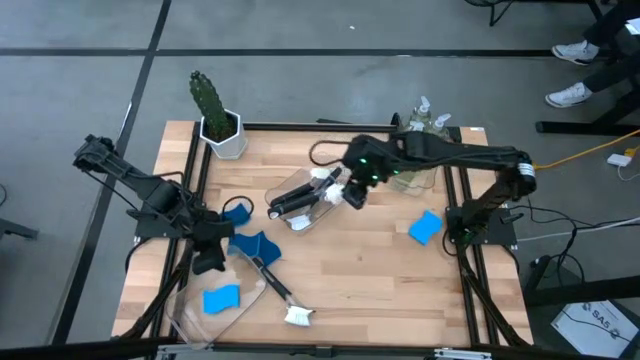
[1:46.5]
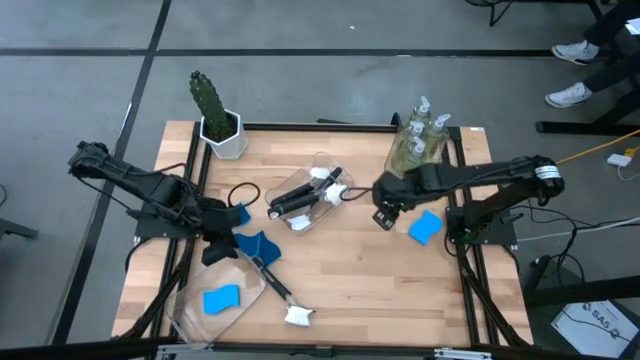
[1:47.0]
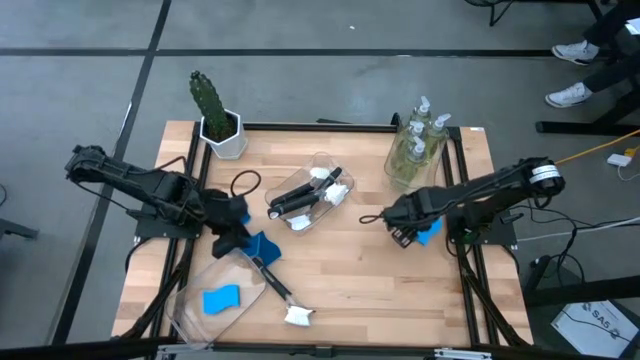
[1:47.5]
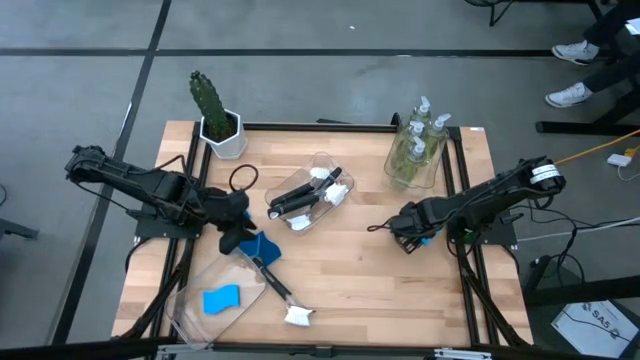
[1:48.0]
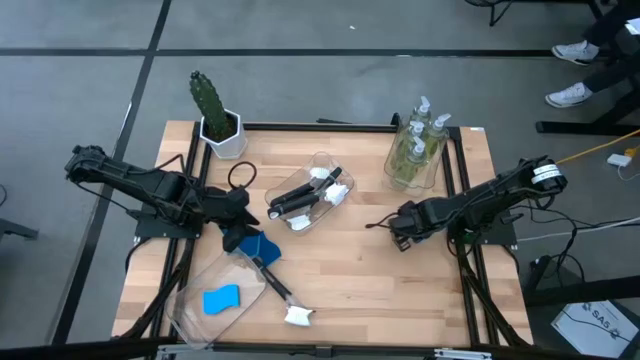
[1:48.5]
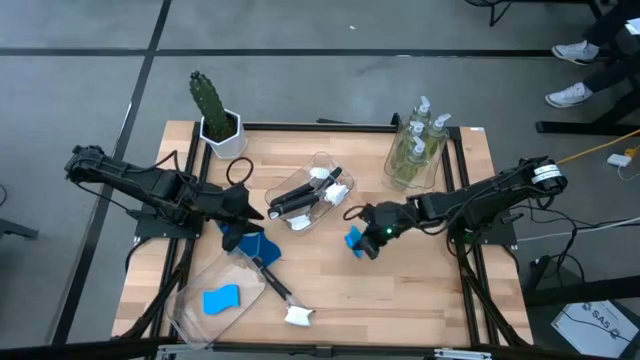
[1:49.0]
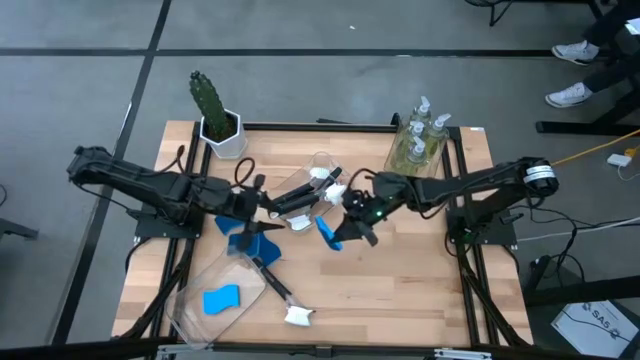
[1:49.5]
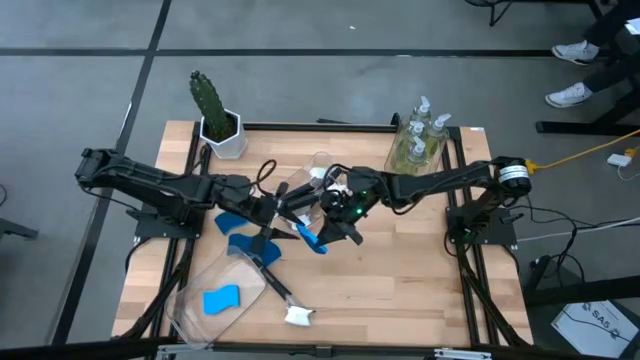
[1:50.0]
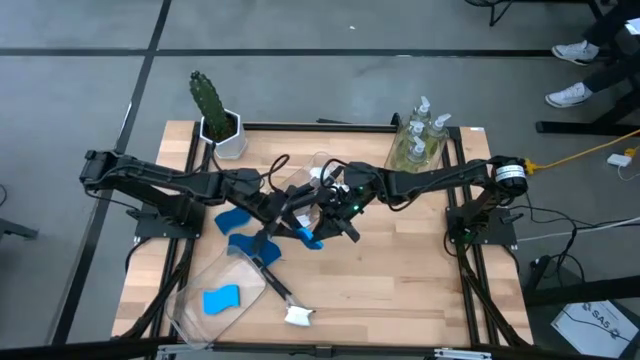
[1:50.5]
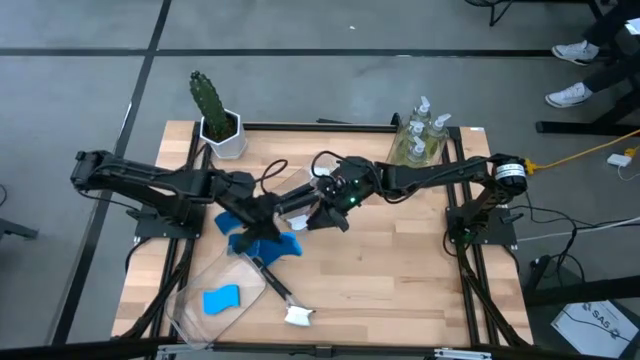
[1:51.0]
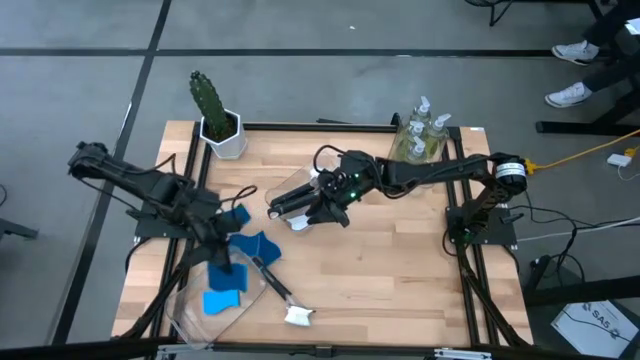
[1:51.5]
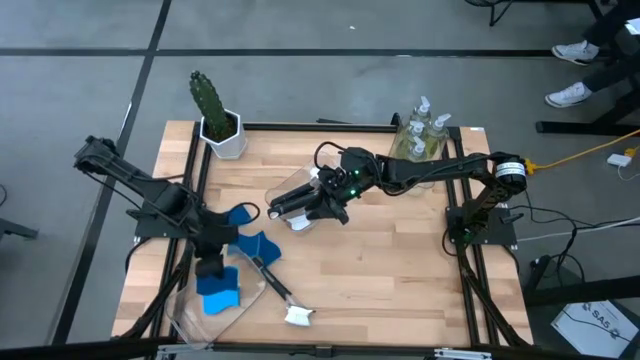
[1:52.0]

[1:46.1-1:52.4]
Task: Pick & Place Kitchen Sink Supplies
Put the blue sponge into the bottom transparent bin

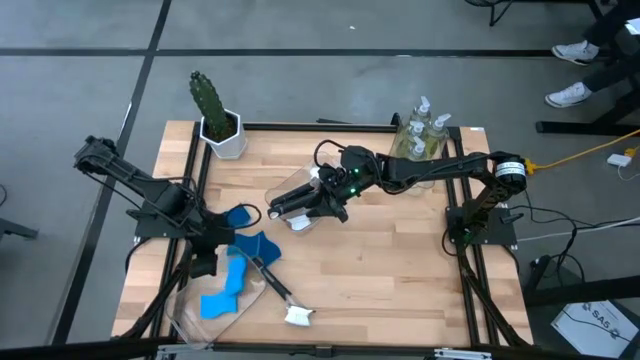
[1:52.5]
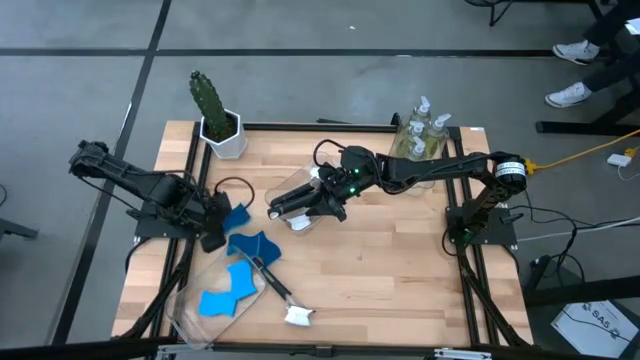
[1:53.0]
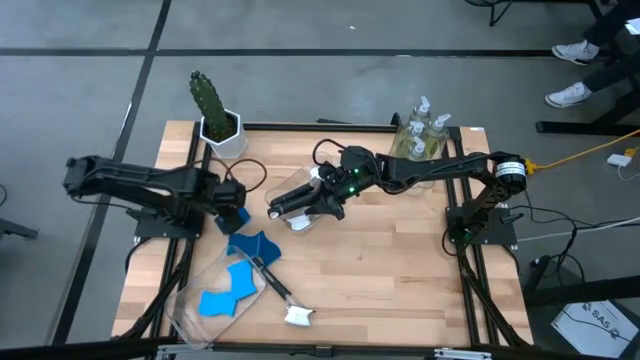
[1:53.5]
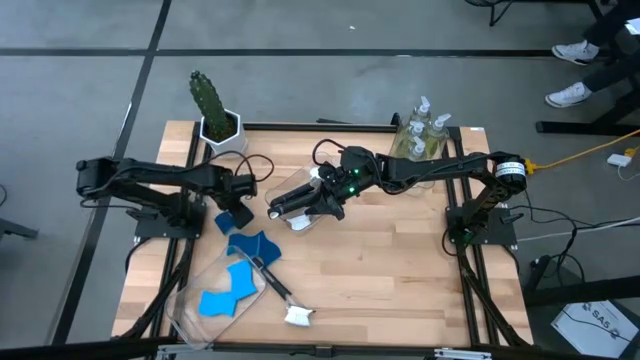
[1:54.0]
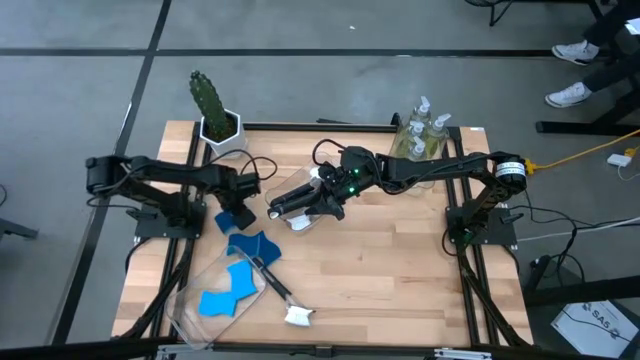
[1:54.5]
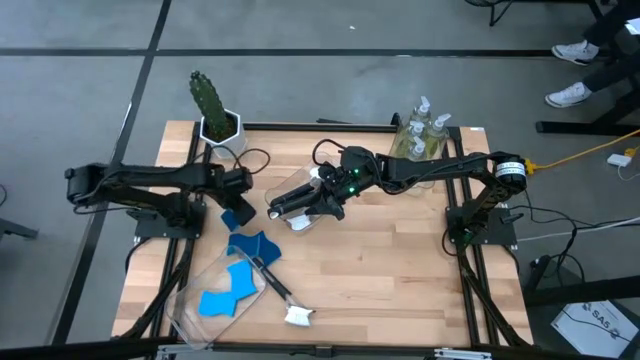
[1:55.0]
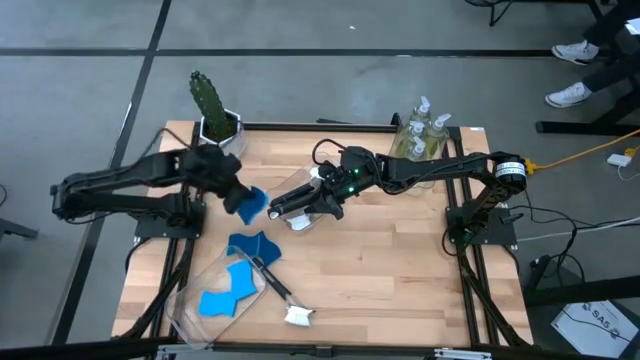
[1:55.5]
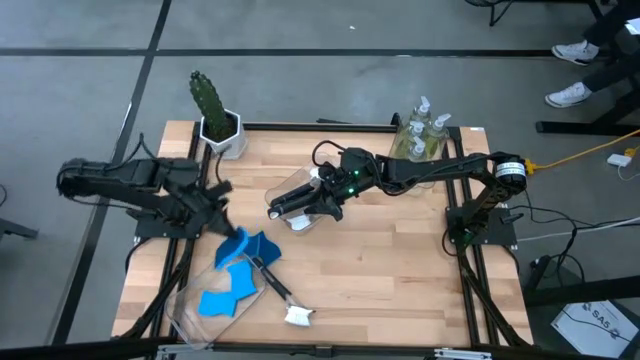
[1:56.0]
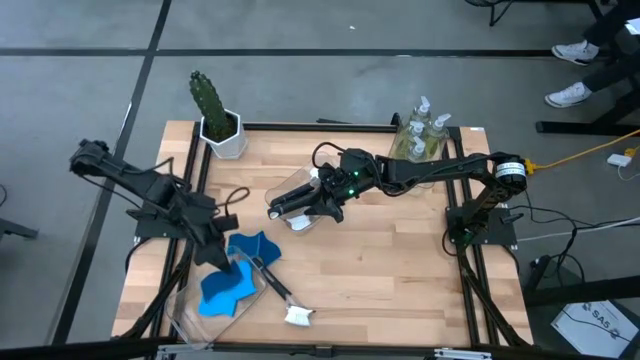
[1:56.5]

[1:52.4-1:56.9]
Put the blue sponge into the bottom transparent bin

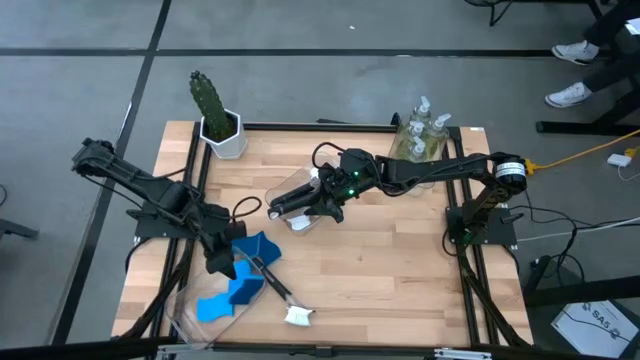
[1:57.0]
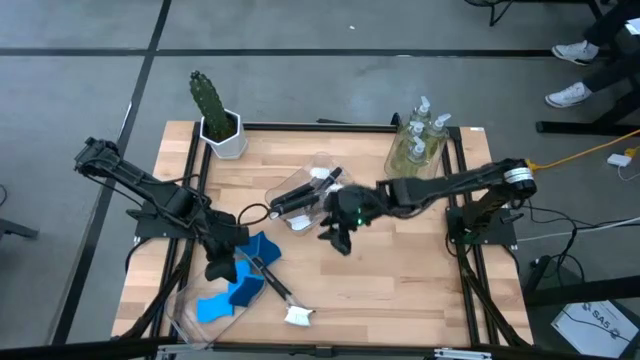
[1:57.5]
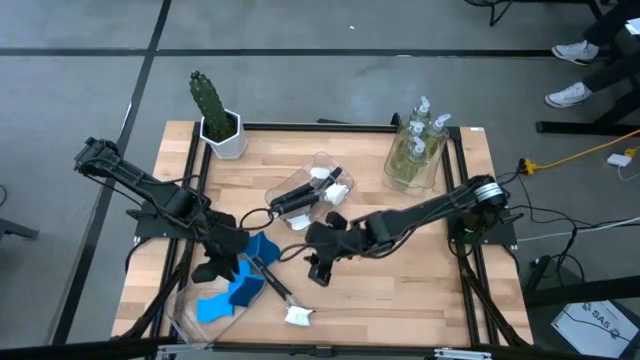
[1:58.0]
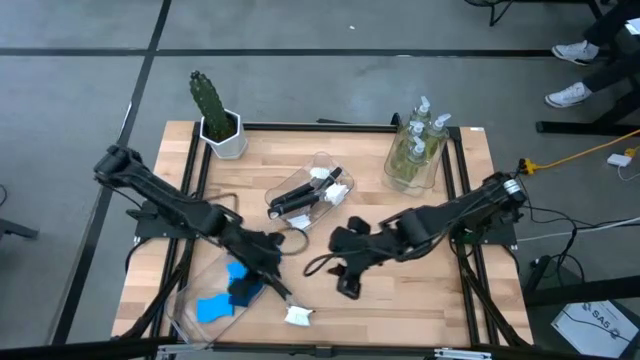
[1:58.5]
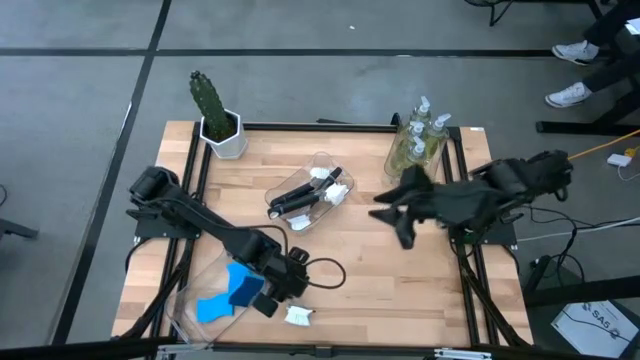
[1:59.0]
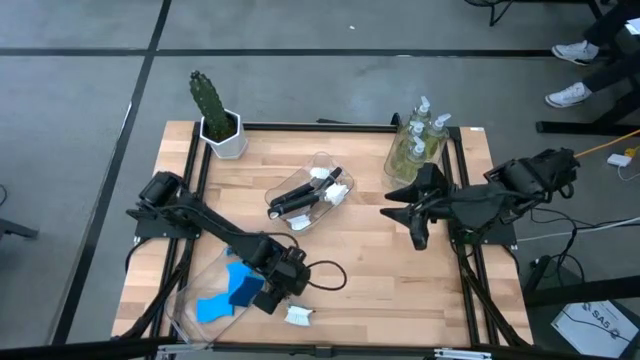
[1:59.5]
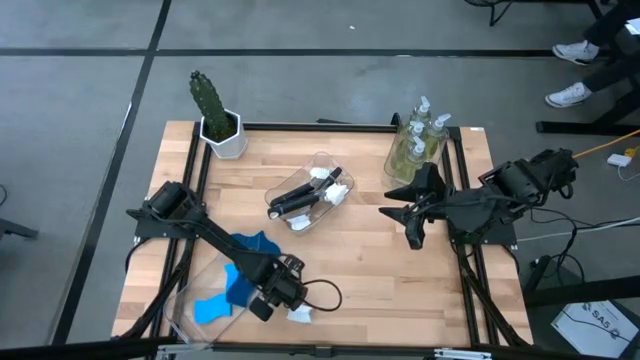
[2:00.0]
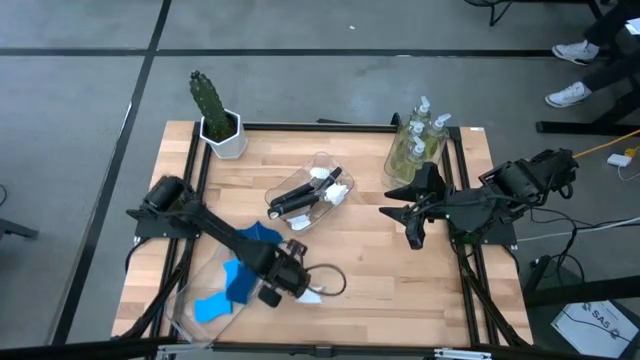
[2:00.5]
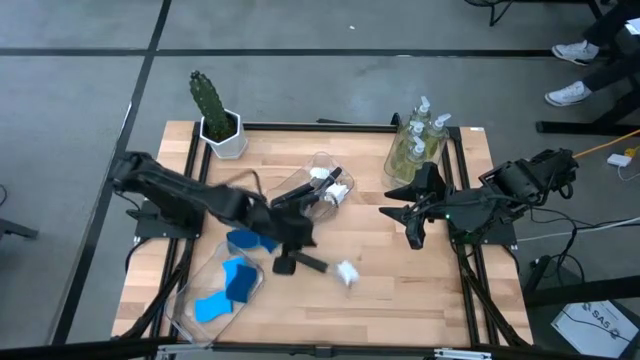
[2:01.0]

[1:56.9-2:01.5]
Put the black dish brush into the top left transparent bin

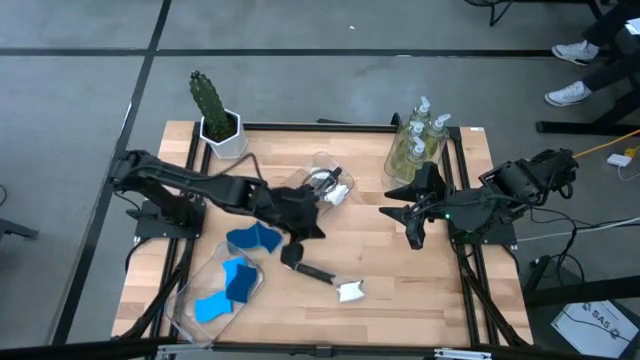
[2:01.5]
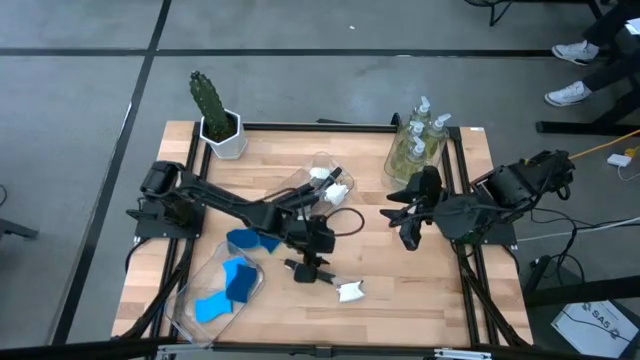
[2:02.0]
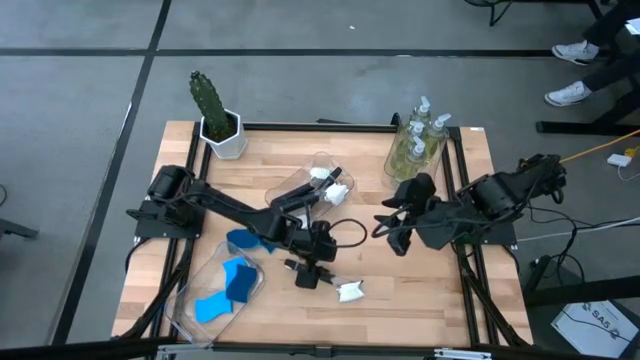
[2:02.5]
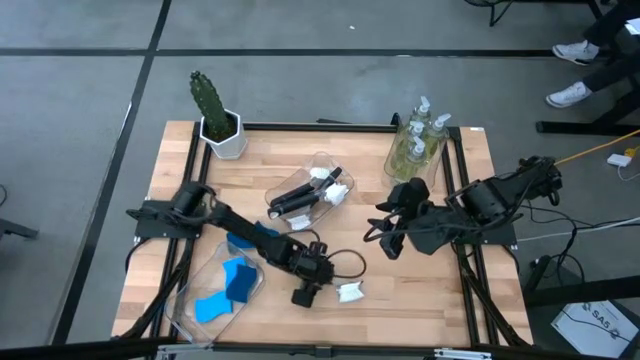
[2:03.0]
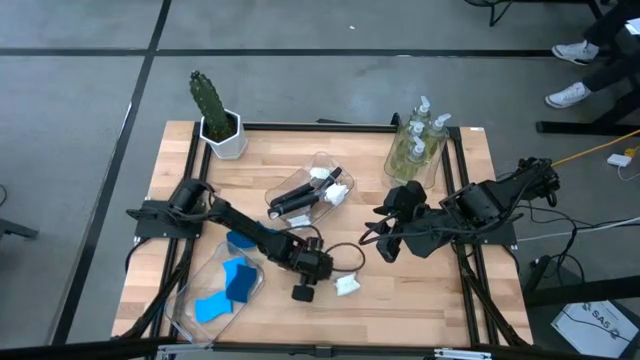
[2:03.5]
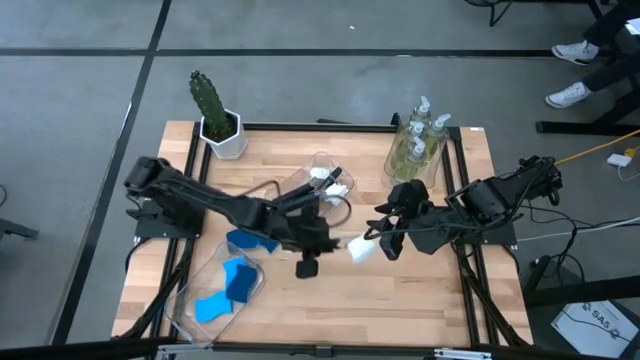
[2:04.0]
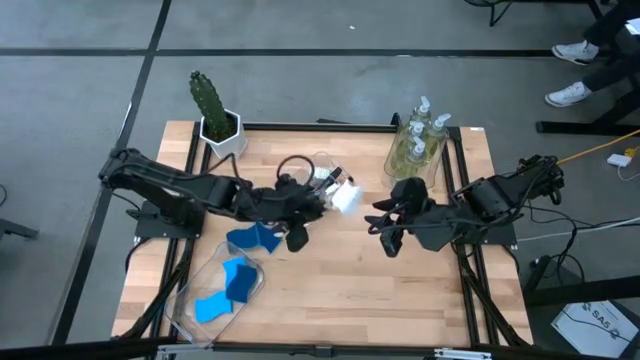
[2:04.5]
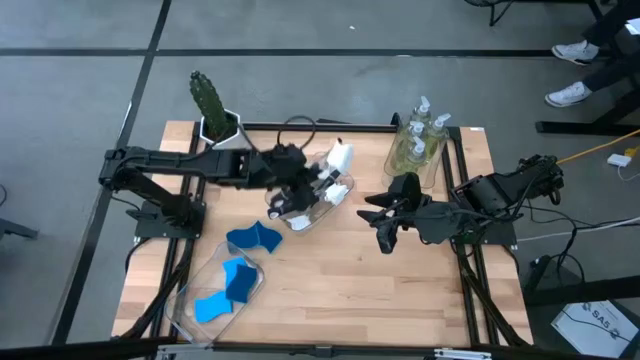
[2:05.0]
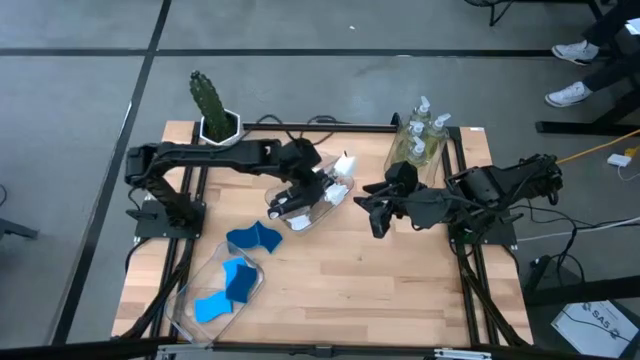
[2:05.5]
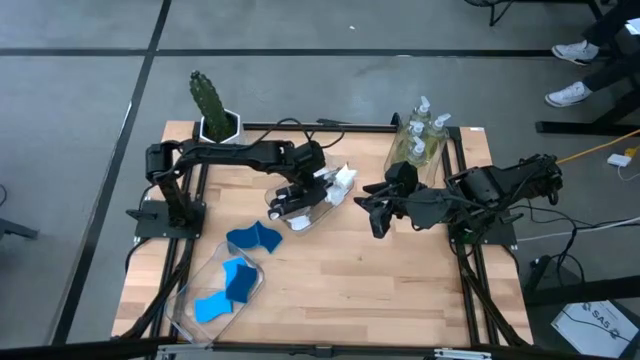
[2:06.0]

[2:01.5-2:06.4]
Put the black dish brush into the top left transparent bin

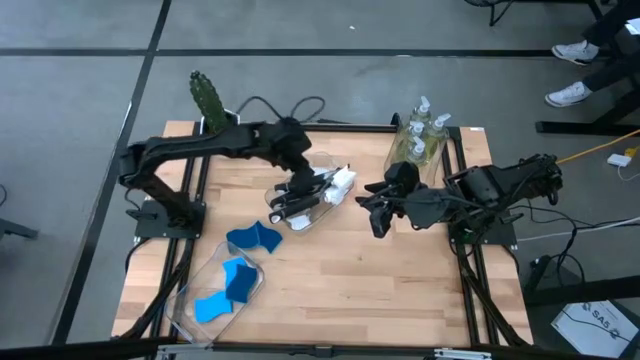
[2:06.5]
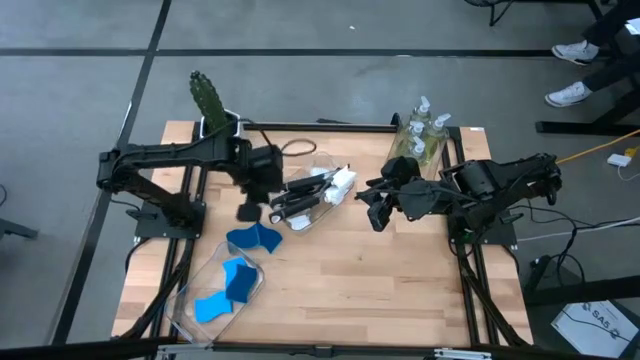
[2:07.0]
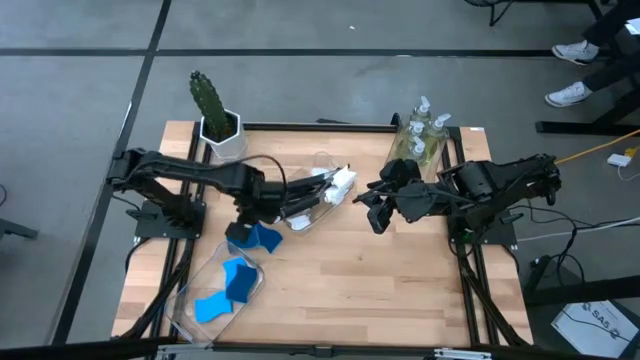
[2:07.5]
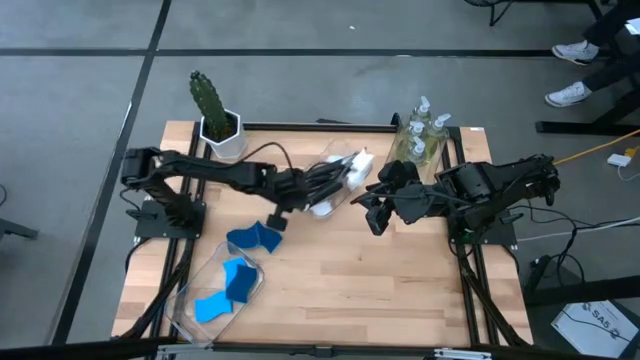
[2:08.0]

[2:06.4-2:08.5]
Adjust the top left transparent bin
